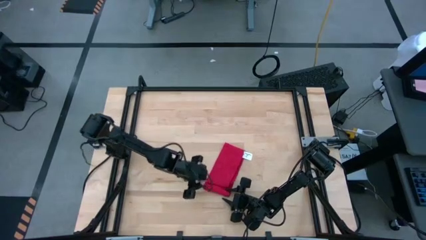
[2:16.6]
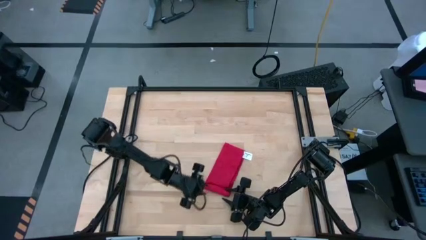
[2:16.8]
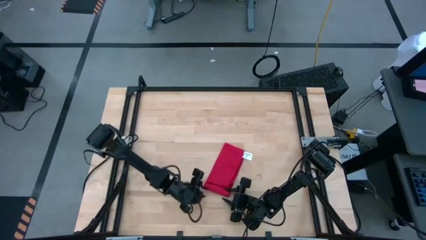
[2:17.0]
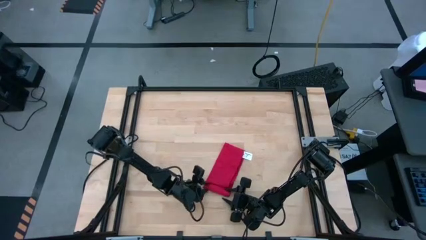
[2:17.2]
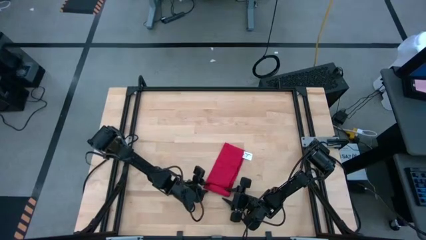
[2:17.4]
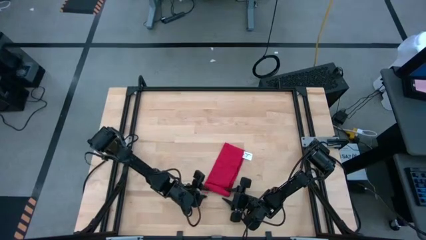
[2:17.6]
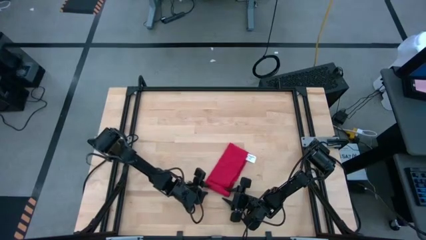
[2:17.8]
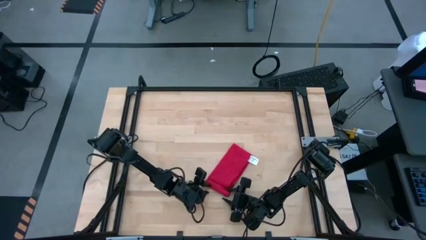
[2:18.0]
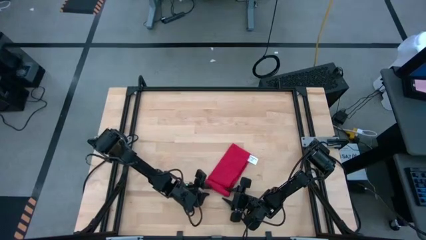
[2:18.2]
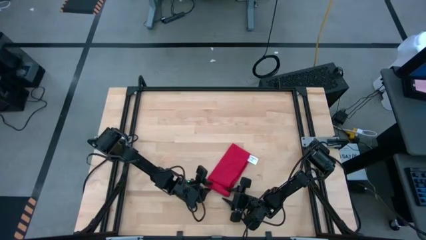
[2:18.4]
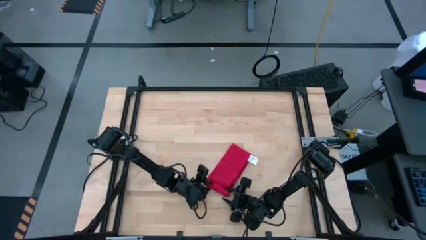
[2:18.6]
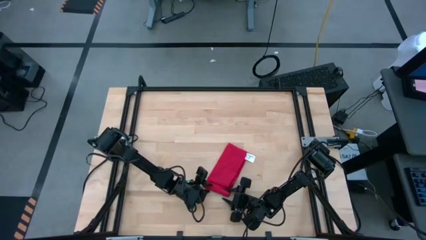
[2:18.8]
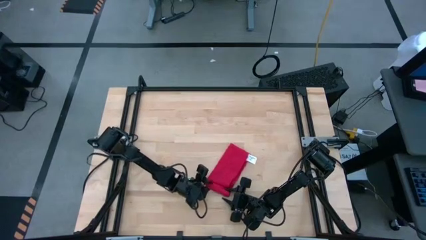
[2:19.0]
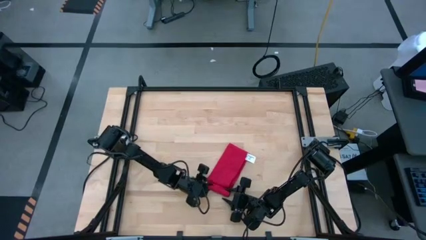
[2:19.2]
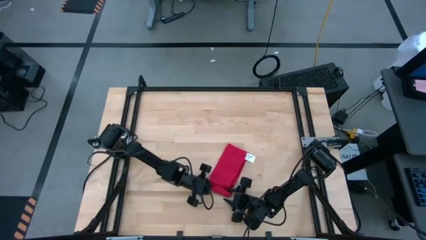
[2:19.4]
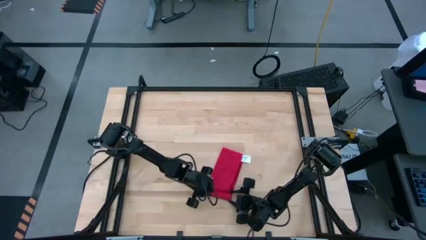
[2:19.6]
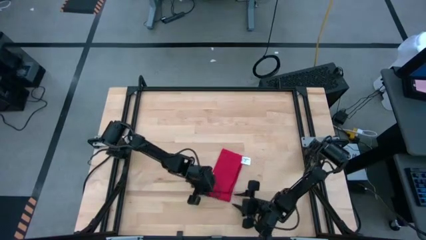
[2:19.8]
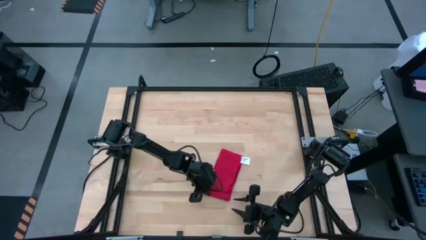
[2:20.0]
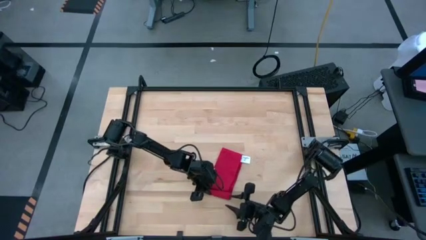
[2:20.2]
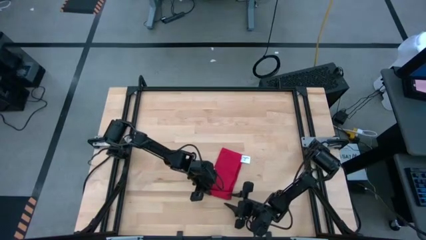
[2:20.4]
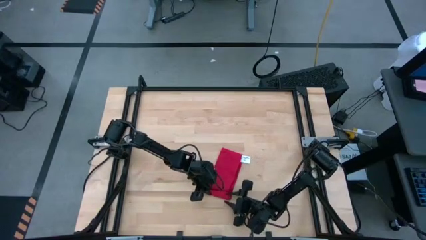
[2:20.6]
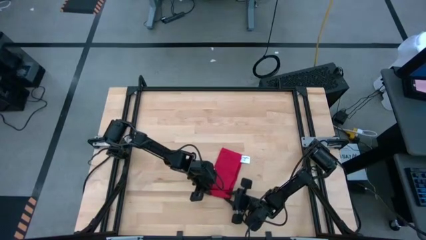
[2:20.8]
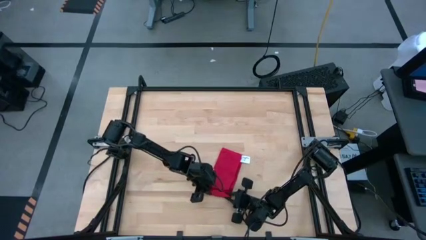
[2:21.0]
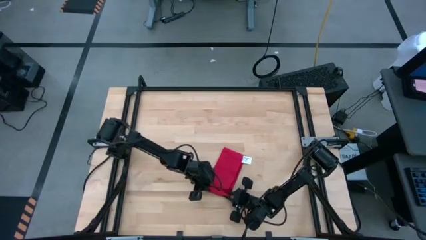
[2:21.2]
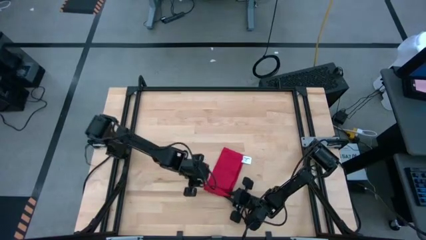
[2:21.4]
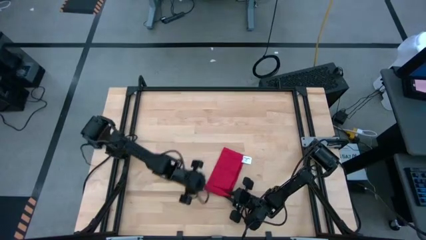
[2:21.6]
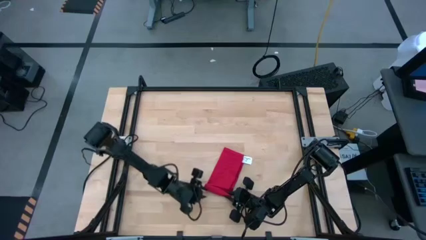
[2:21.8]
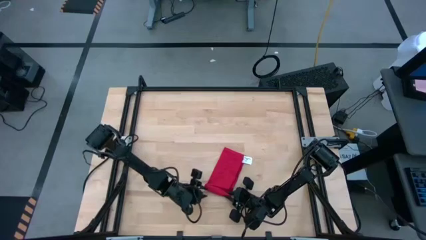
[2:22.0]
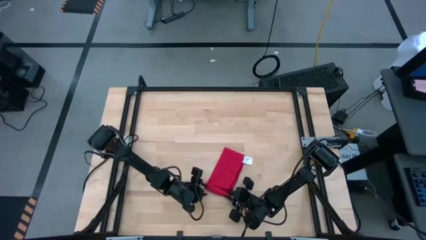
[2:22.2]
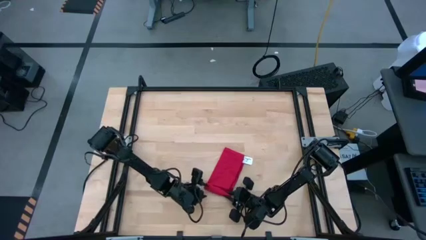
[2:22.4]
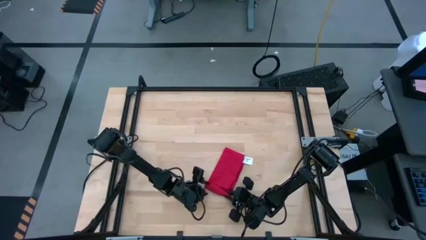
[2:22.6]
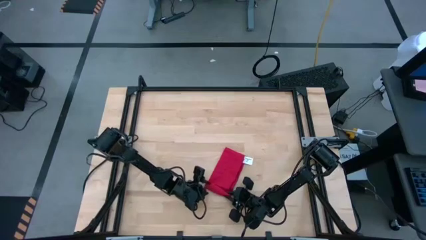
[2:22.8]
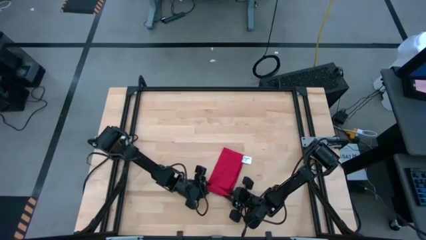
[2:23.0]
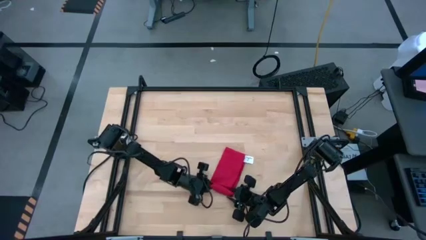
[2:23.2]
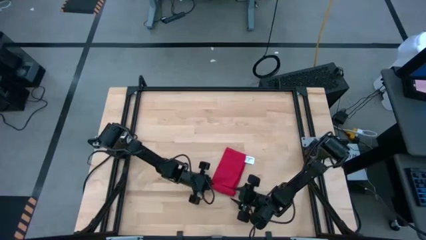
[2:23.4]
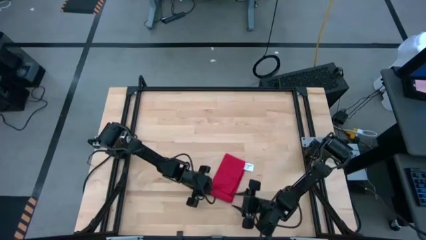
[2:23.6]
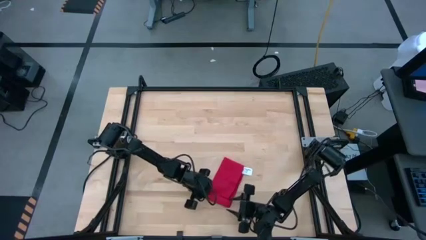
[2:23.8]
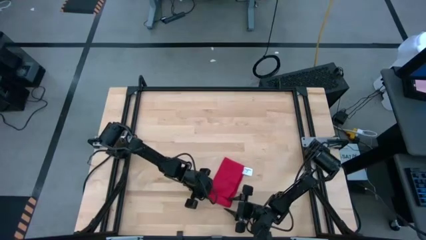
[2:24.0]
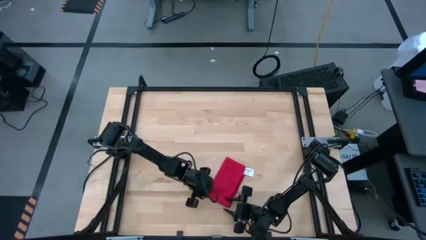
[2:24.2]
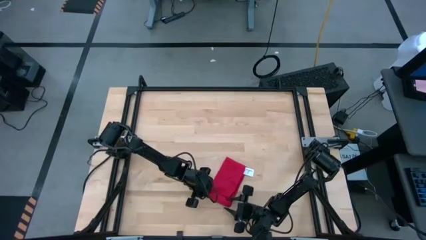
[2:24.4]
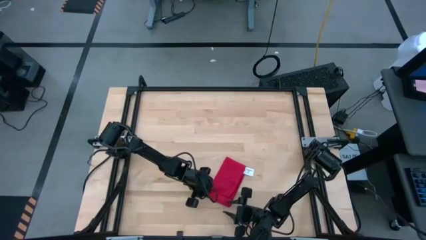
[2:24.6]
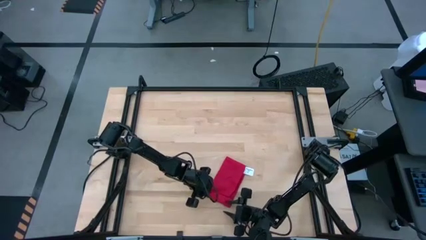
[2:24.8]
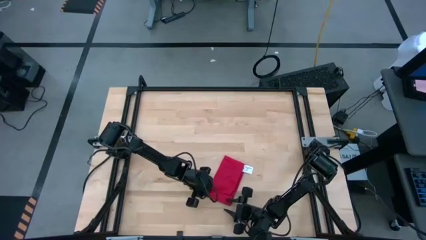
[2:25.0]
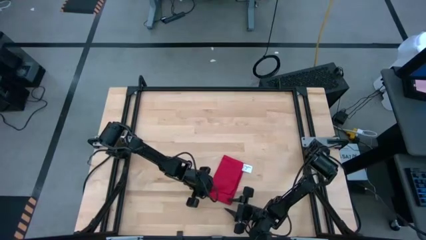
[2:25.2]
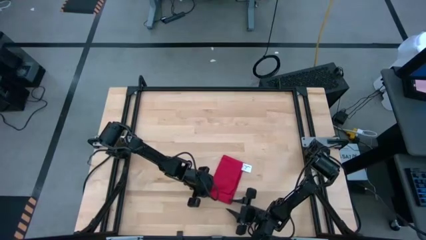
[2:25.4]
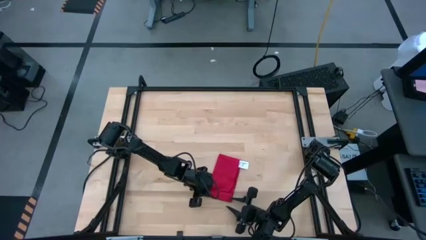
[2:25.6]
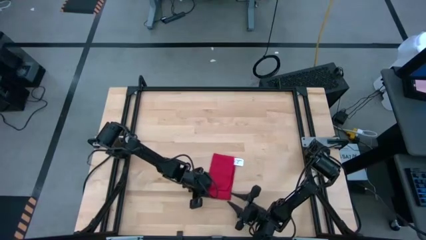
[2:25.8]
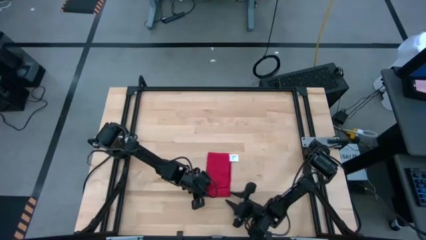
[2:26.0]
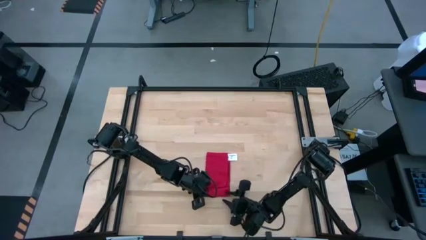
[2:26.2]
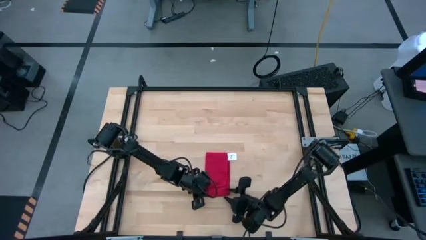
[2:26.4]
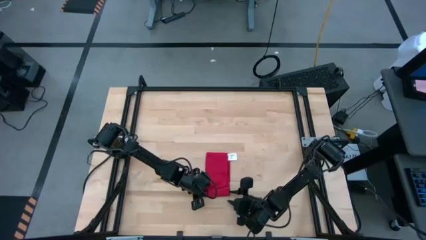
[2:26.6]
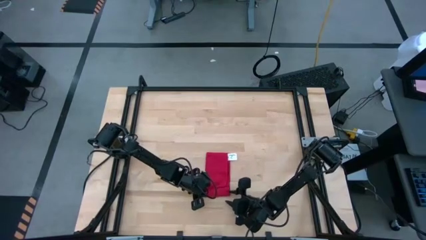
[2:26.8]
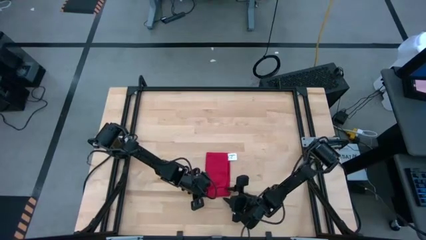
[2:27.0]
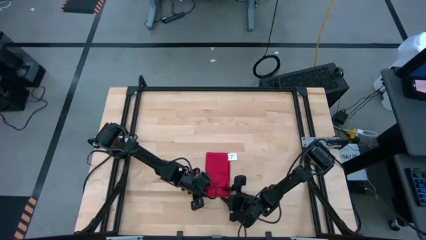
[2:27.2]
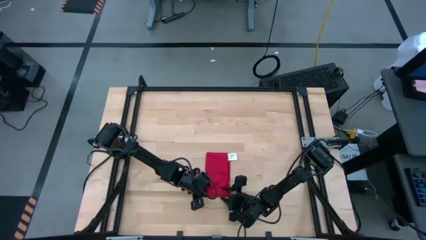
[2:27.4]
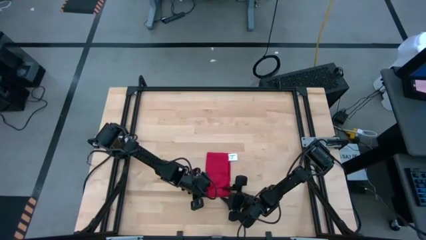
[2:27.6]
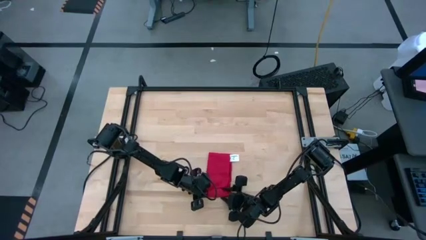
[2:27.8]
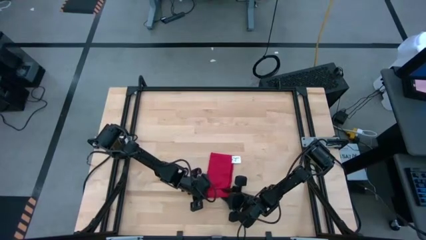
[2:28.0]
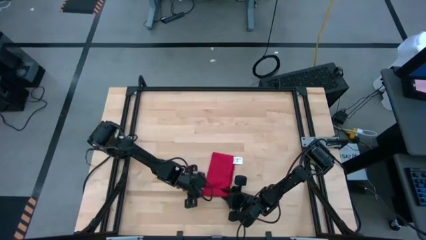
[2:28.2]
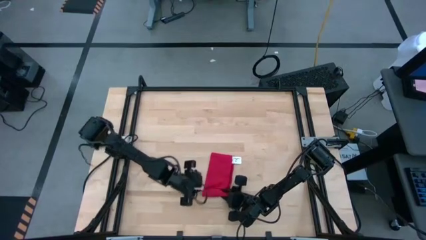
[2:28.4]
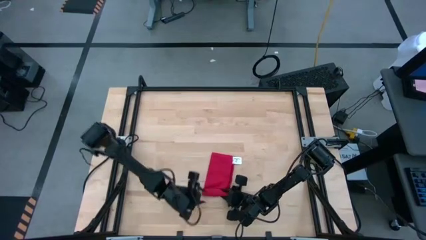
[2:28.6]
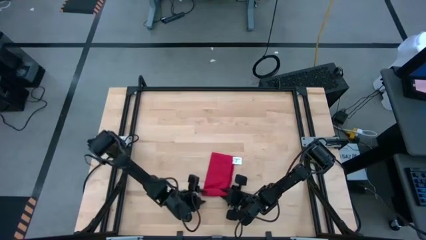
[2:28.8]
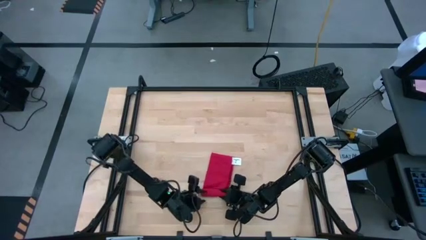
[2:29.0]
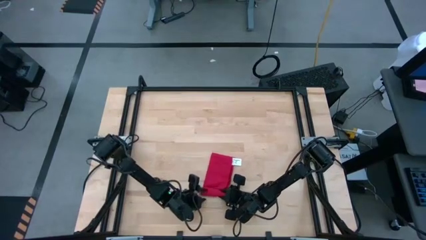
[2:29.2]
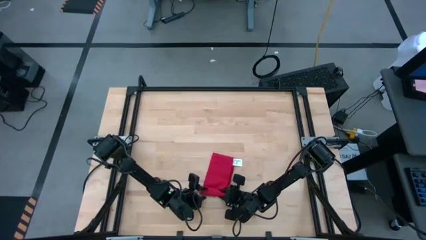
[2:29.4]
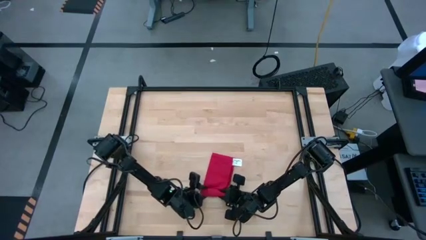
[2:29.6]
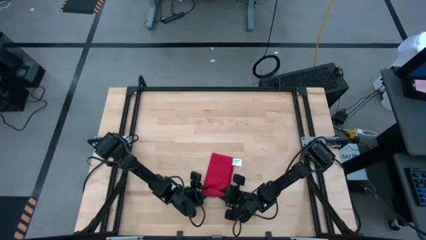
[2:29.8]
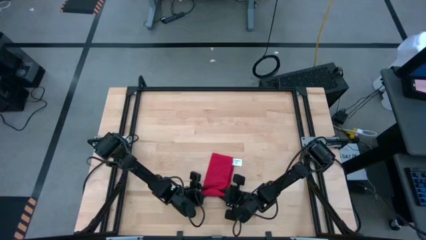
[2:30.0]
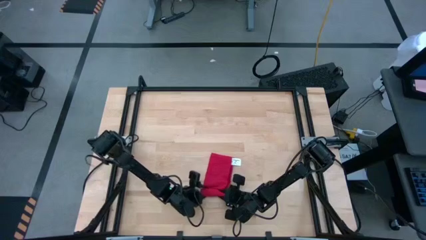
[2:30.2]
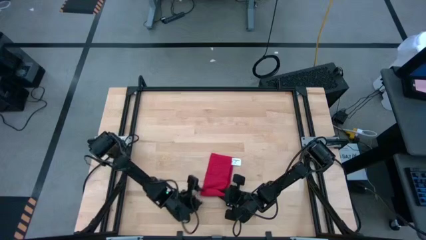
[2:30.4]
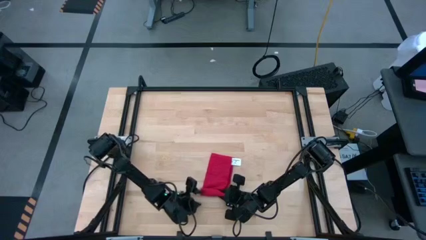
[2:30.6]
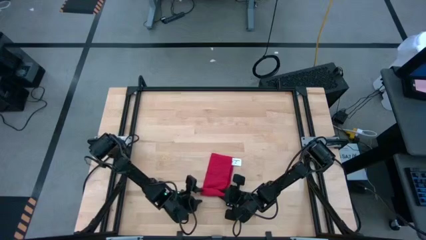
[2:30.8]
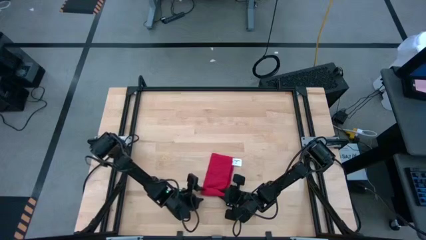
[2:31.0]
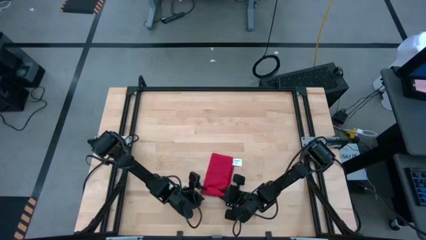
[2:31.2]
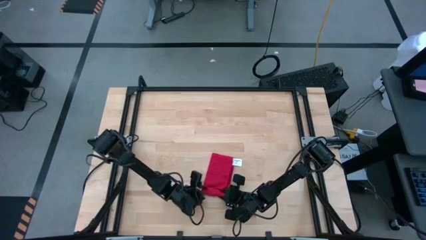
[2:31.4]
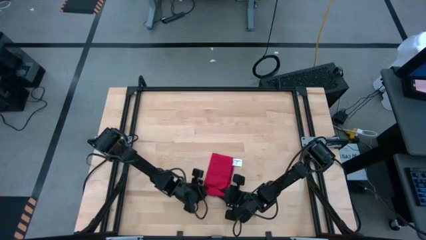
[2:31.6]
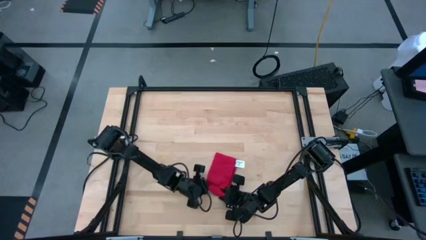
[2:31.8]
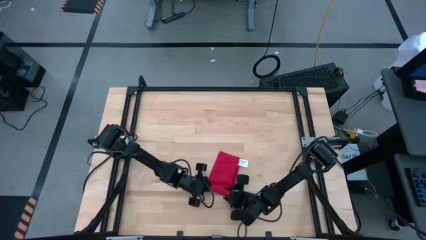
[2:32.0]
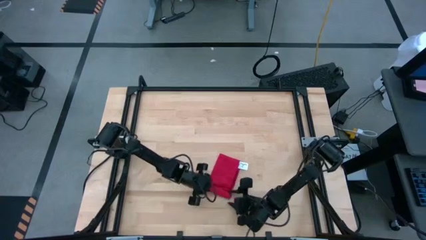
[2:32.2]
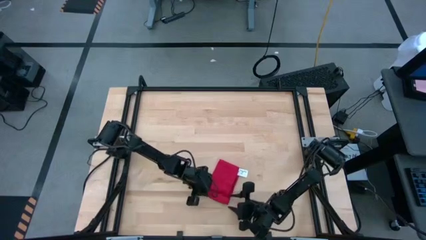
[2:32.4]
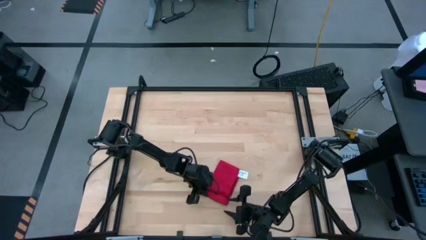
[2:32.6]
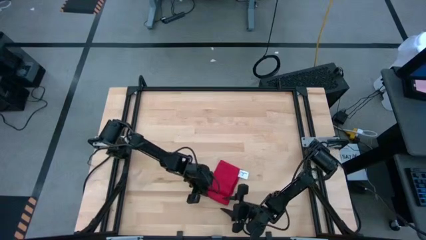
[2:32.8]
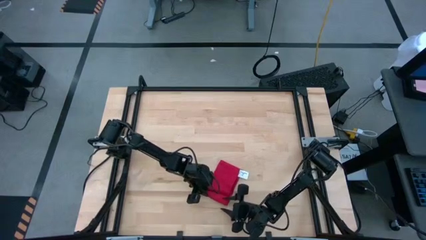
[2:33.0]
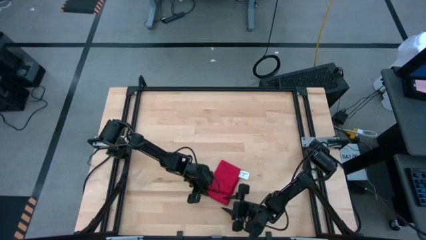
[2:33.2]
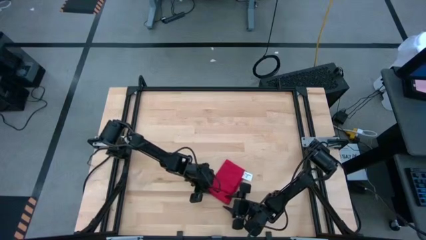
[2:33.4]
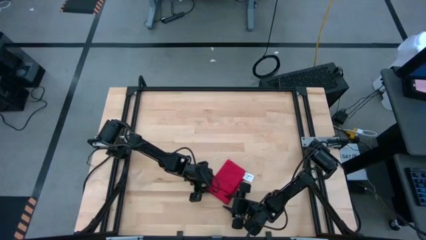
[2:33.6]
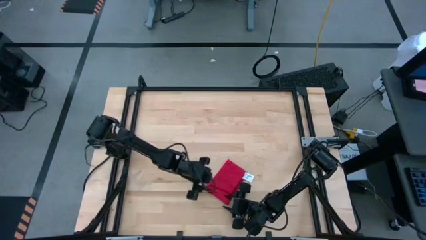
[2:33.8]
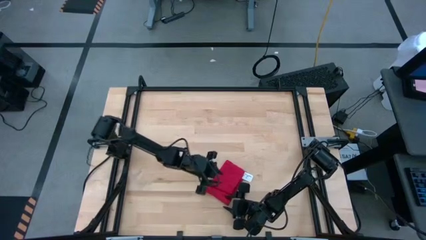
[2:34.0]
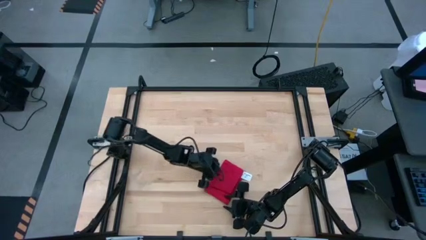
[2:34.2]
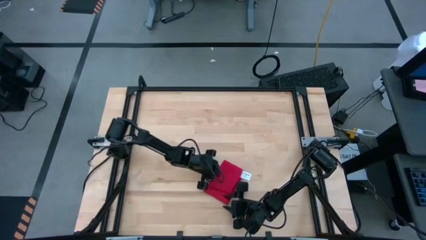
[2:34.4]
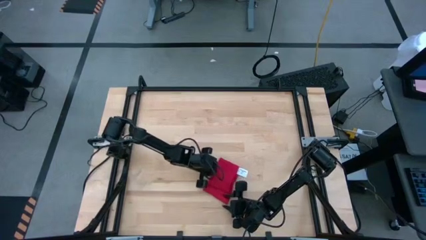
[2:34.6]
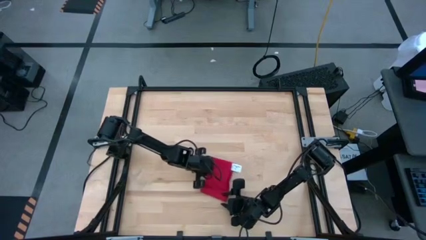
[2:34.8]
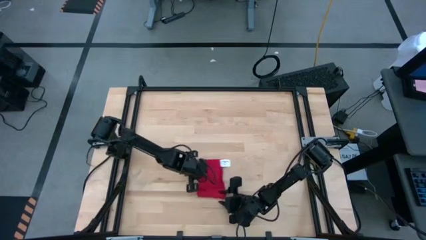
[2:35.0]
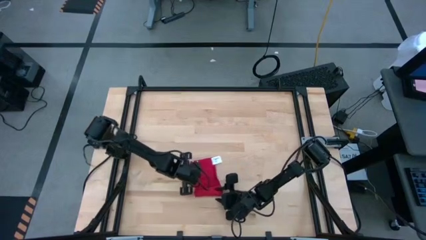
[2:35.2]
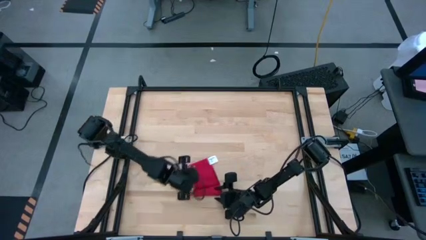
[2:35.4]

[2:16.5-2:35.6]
Task: Roll towel
Roll the red towel
